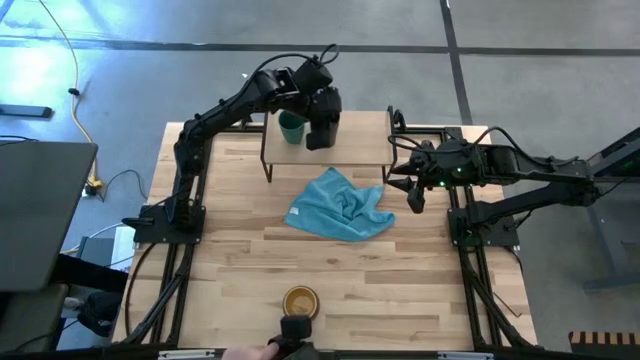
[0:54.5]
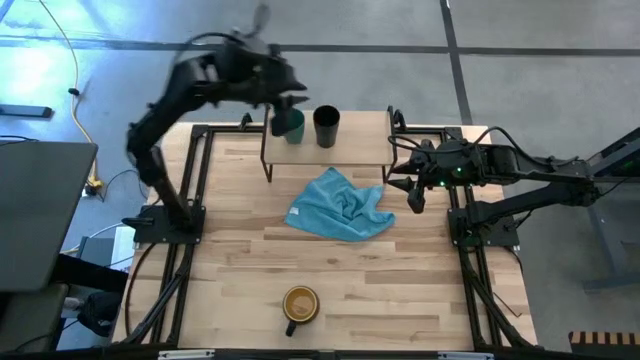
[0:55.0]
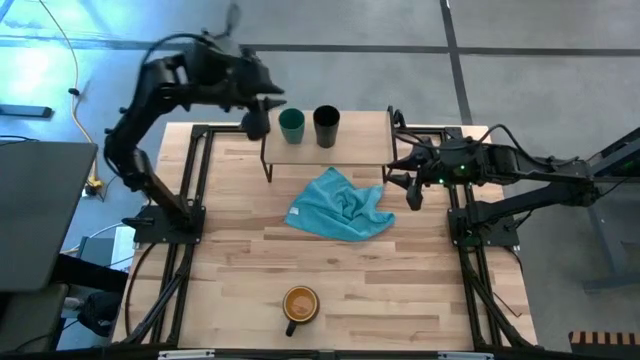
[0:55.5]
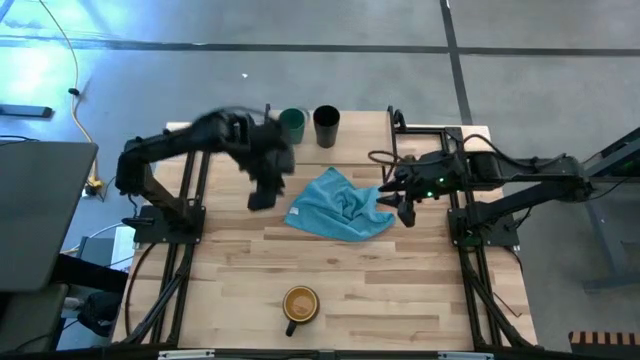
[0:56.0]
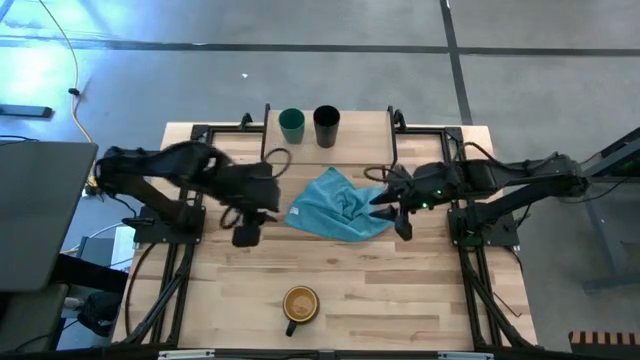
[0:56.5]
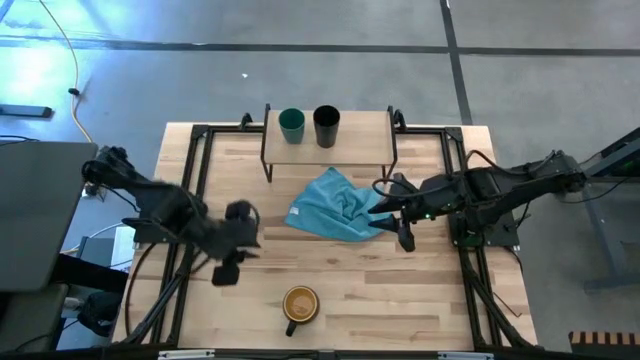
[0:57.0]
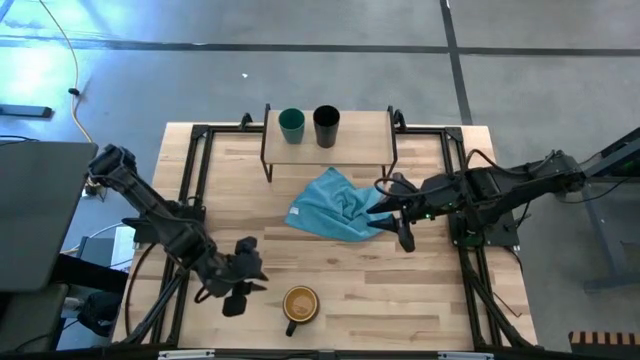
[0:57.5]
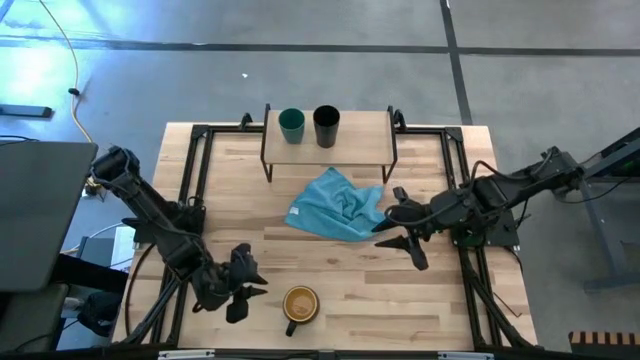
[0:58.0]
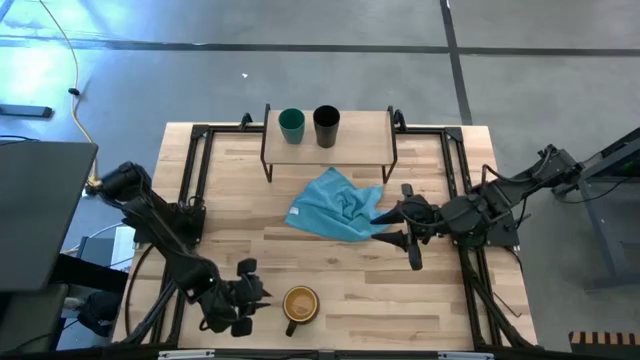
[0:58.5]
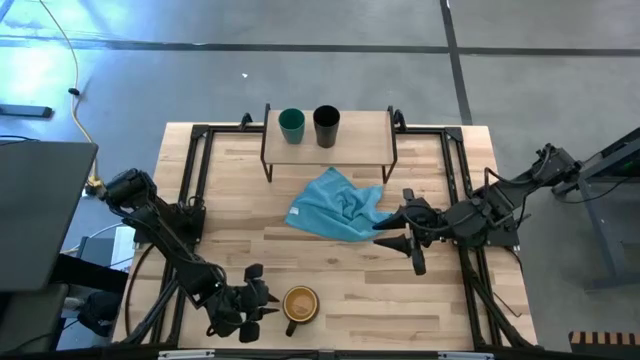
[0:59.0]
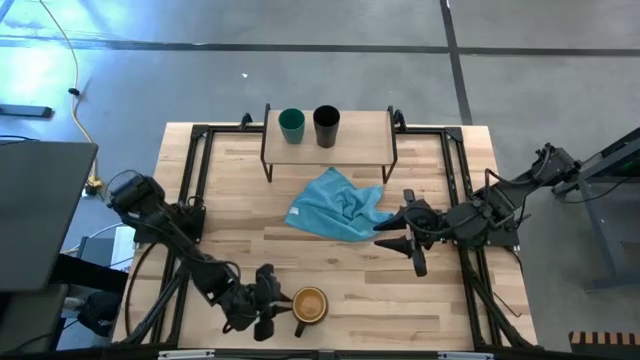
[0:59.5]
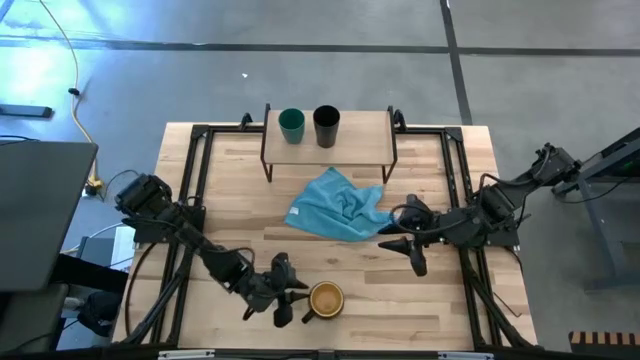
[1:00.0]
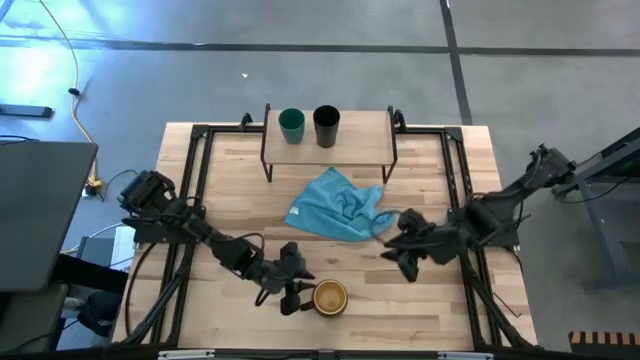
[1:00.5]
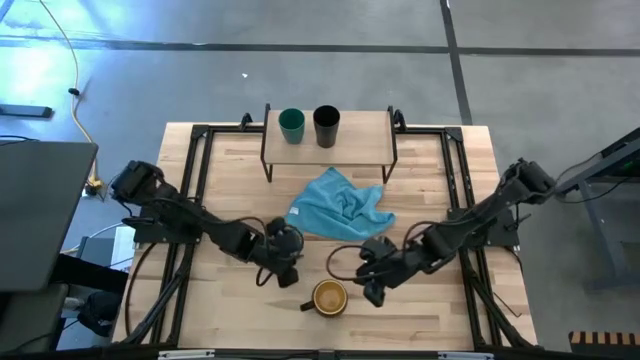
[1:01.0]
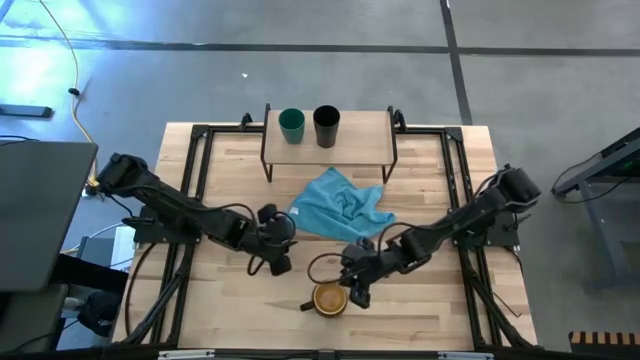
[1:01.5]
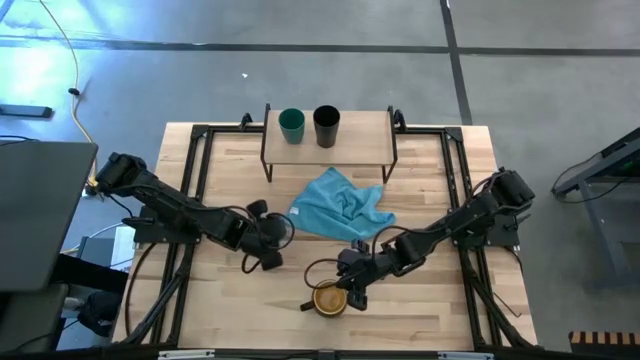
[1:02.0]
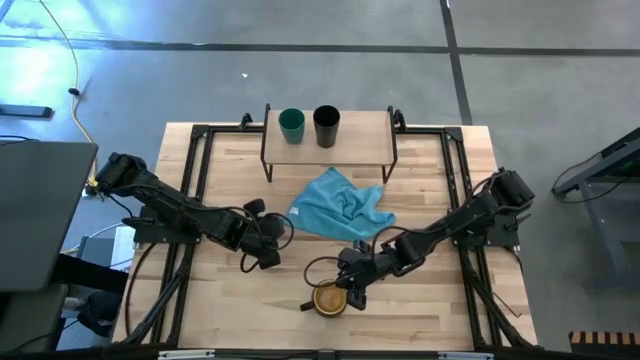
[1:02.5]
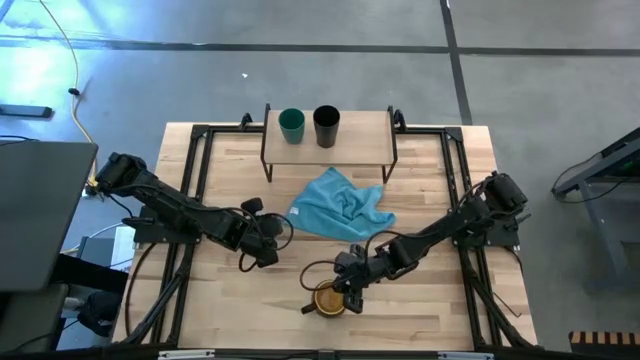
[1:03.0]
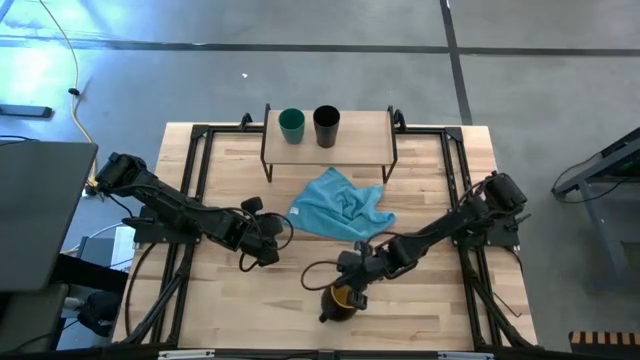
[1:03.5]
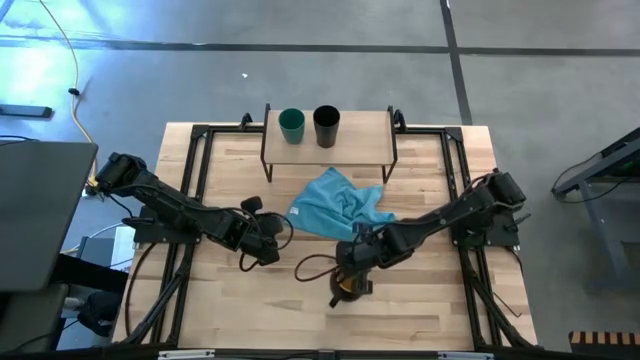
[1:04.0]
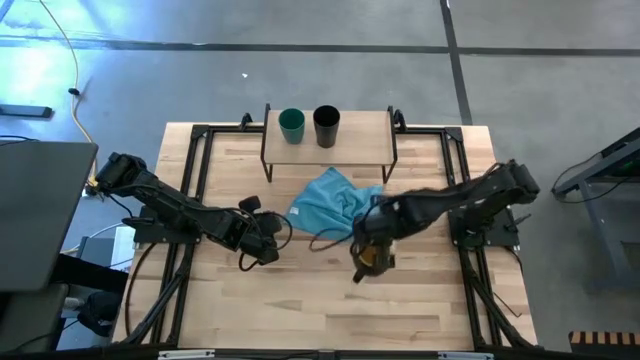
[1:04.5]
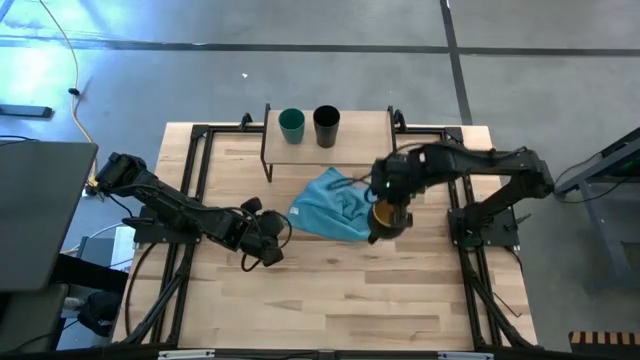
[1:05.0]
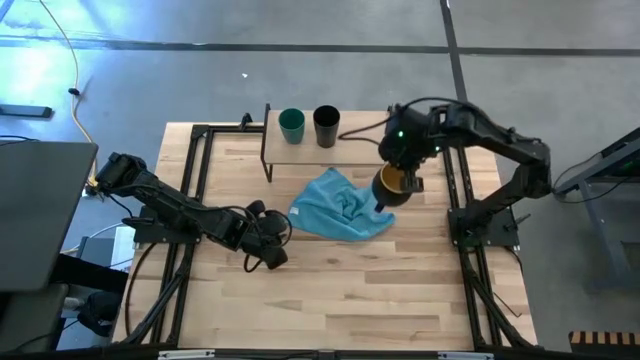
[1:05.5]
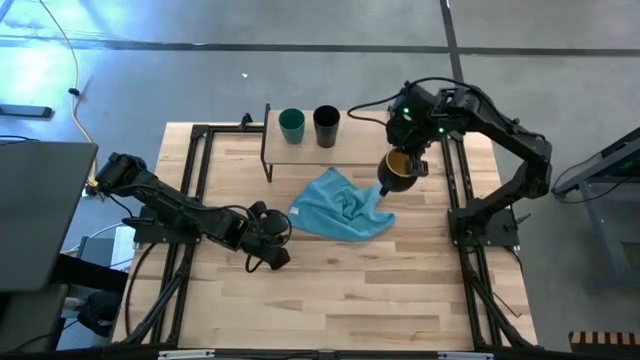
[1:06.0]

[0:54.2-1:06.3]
Task: Stack small to large cups/mugs on shelf
Put the black mug on the shelf

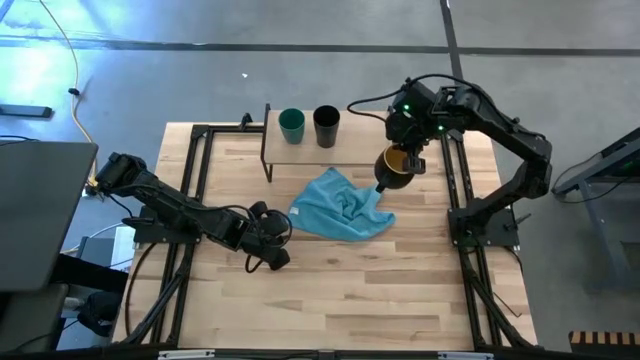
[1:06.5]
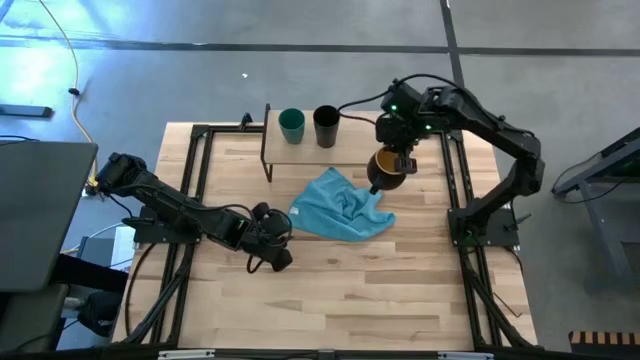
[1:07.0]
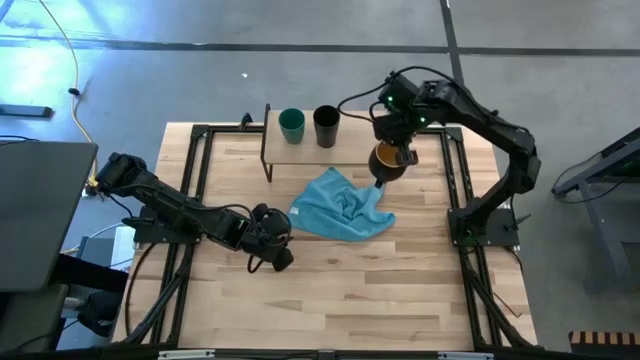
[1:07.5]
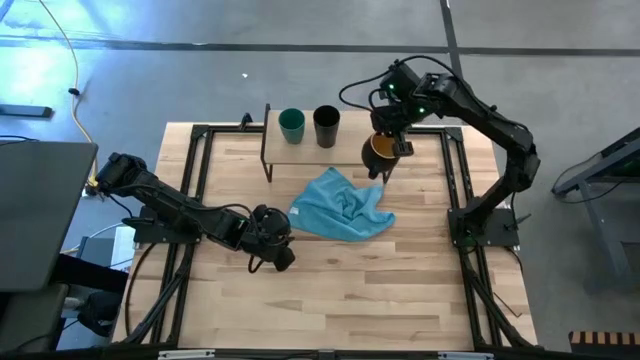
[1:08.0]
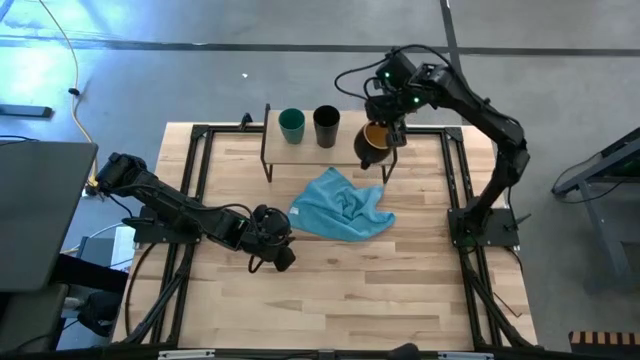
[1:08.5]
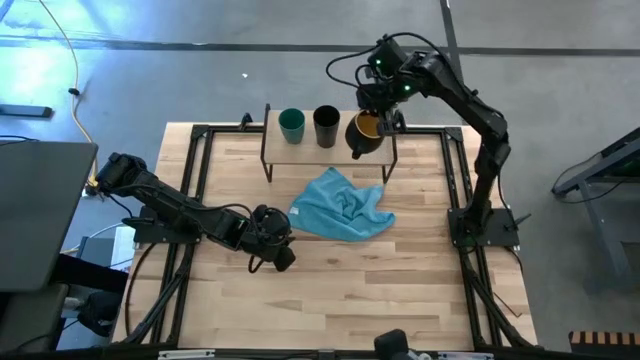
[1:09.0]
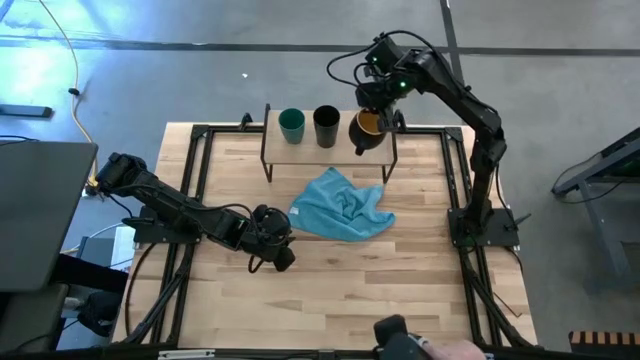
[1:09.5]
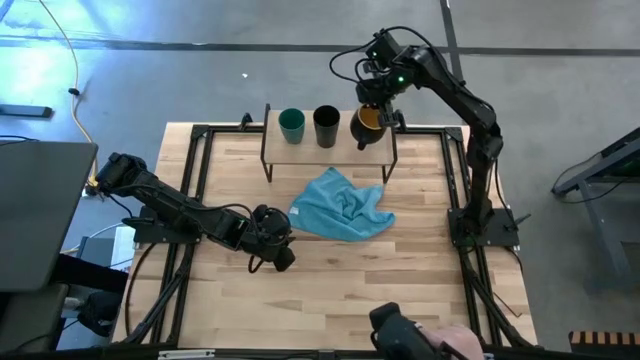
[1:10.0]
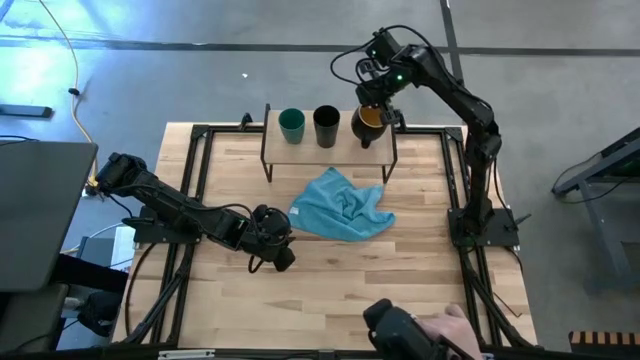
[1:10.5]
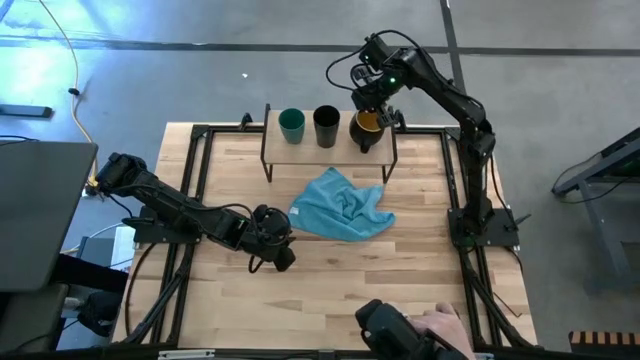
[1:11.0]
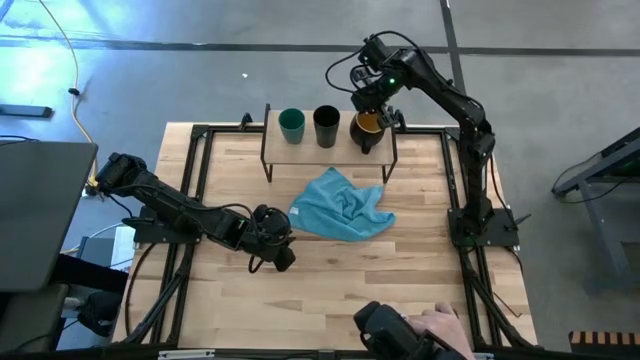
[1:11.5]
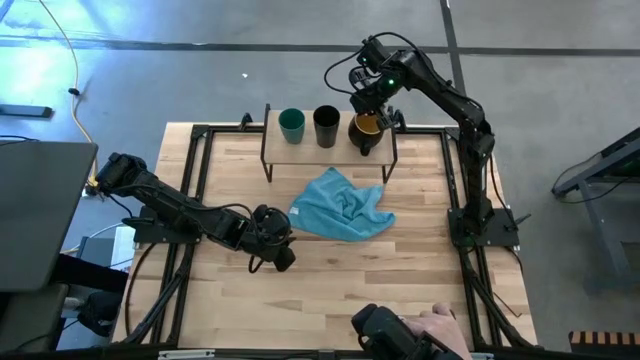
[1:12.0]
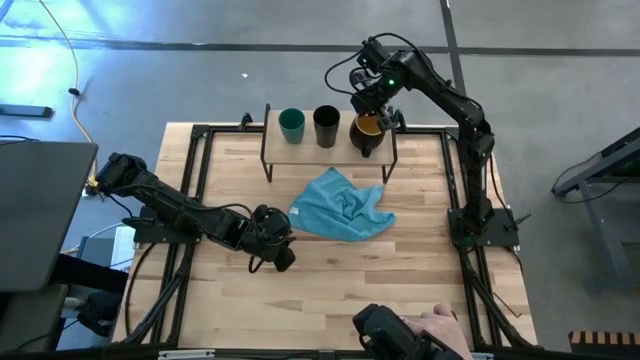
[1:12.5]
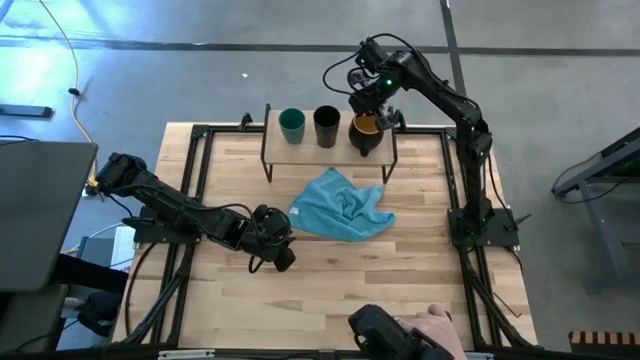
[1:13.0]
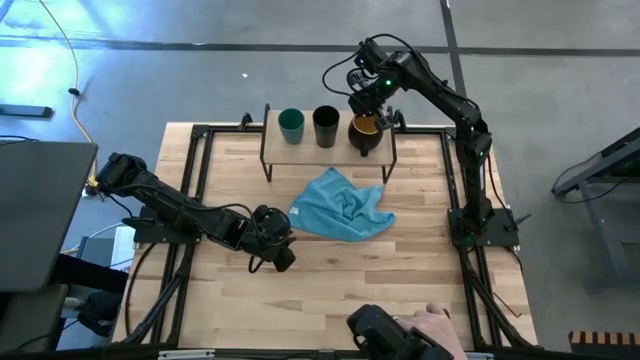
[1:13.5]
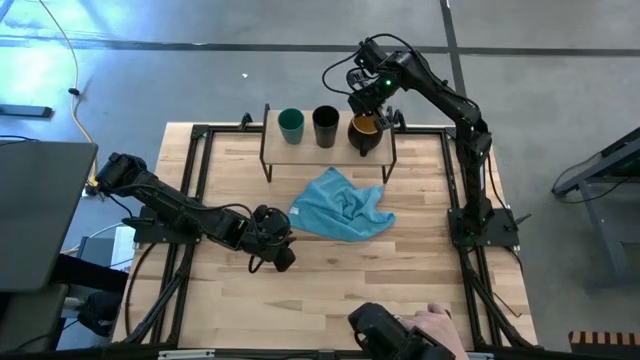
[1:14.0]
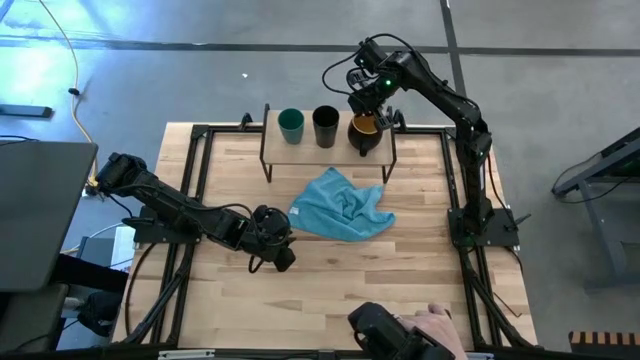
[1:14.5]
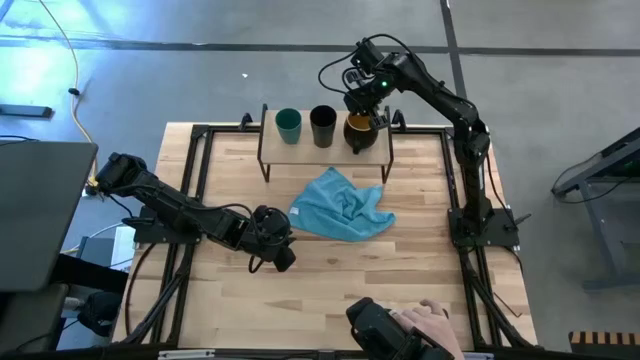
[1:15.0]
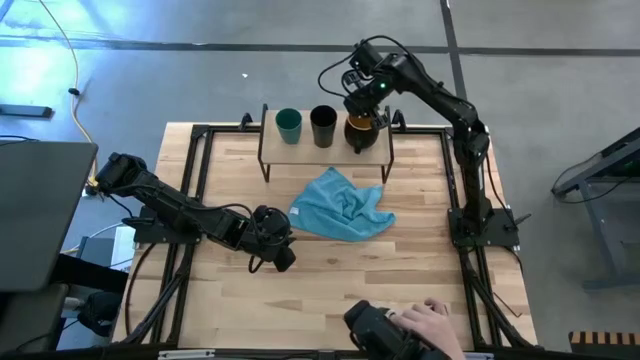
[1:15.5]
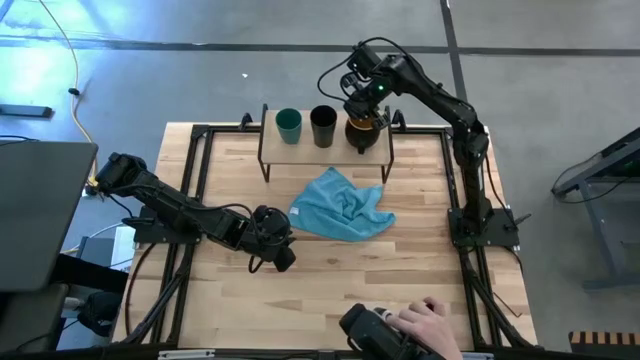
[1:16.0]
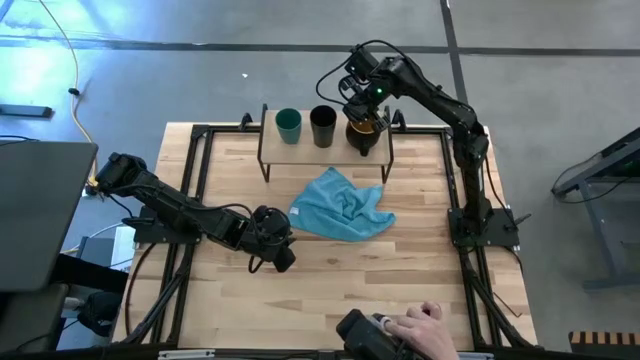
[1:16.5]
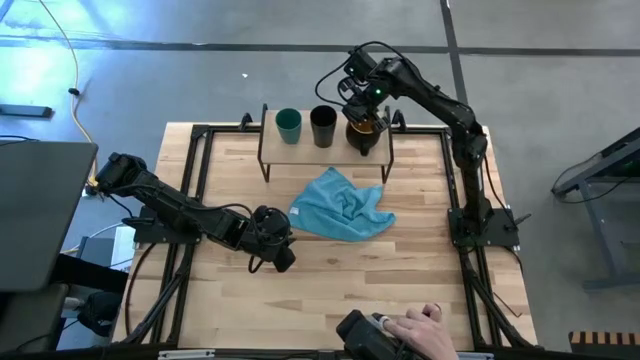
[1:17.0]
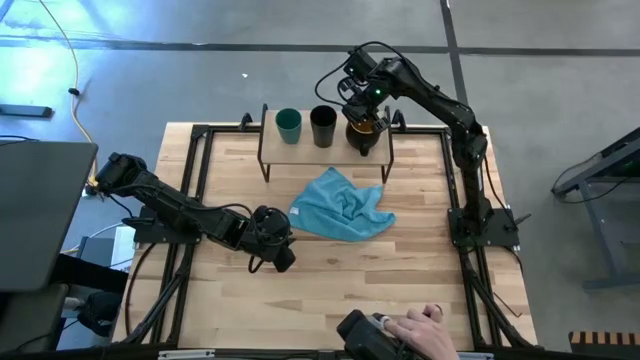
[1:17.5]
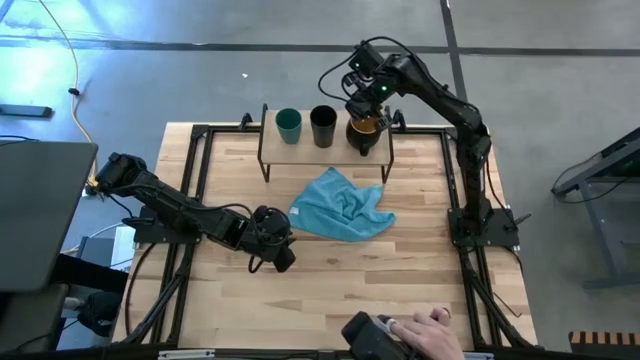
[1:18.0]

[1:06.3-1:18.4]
Put the black mug on the shelf
